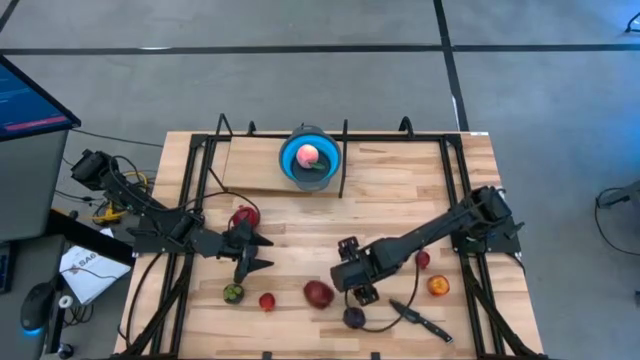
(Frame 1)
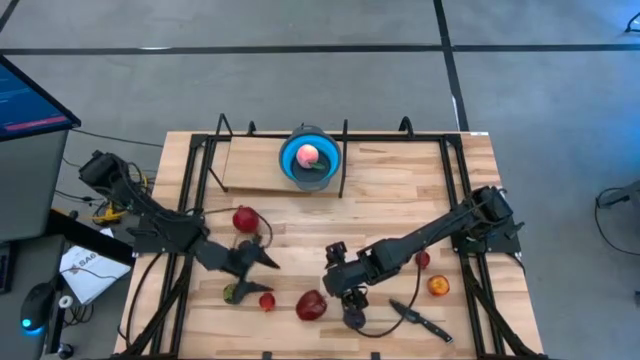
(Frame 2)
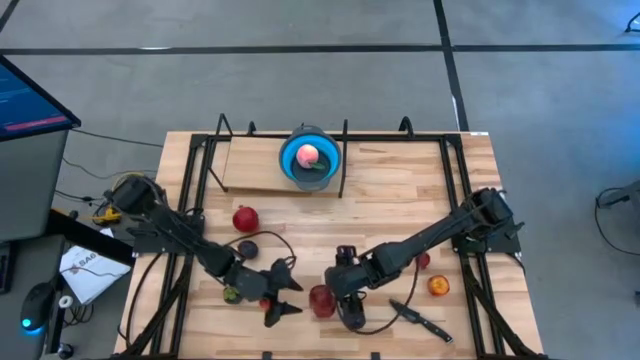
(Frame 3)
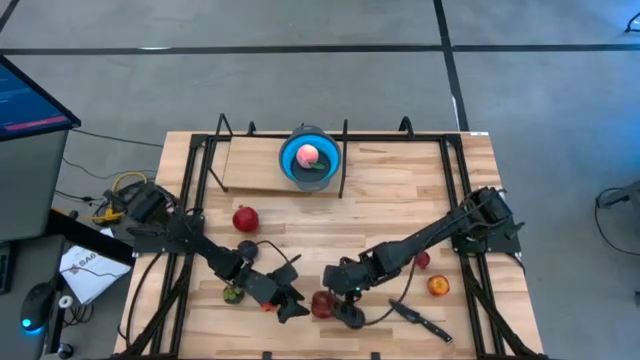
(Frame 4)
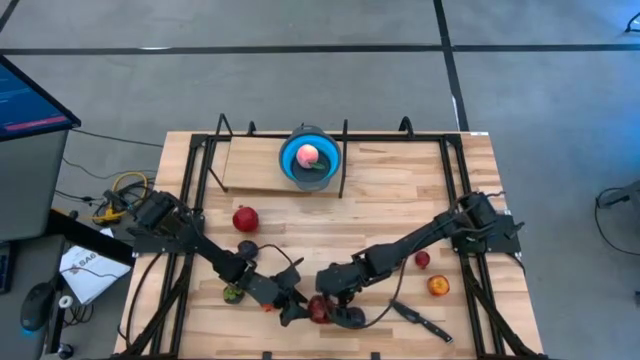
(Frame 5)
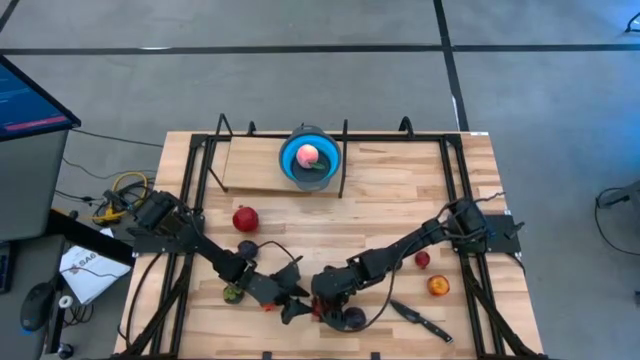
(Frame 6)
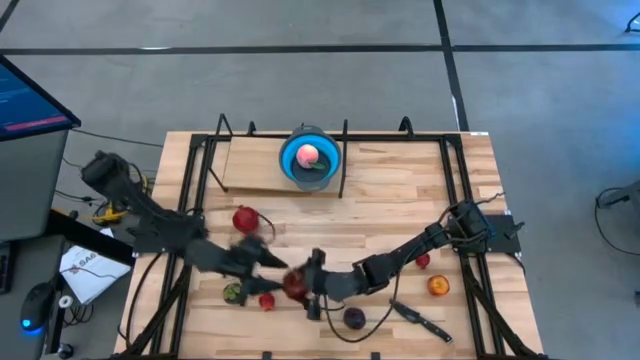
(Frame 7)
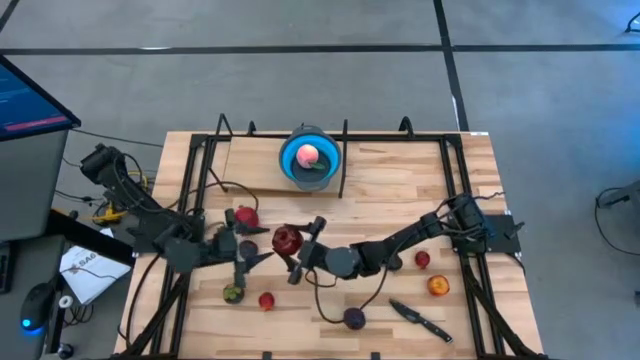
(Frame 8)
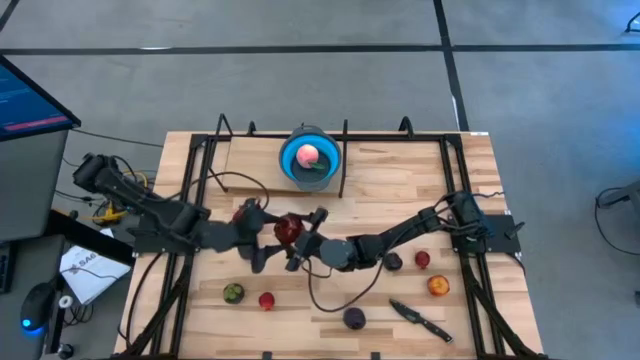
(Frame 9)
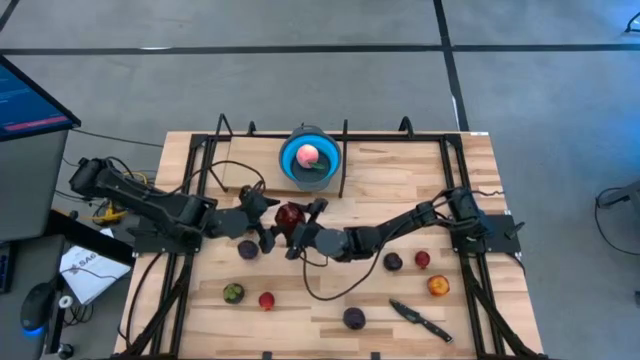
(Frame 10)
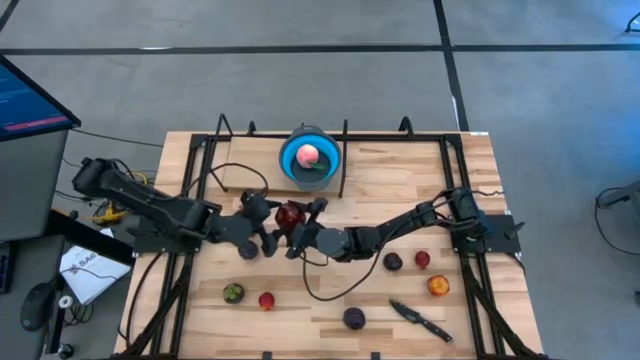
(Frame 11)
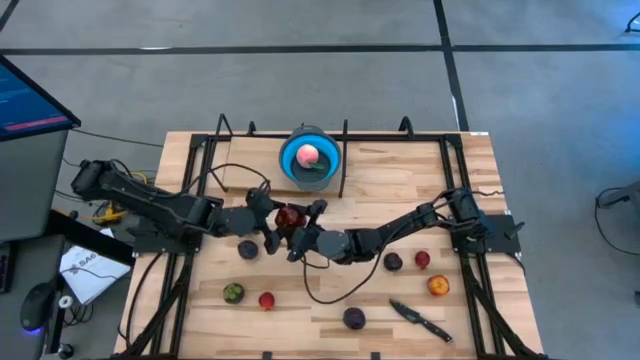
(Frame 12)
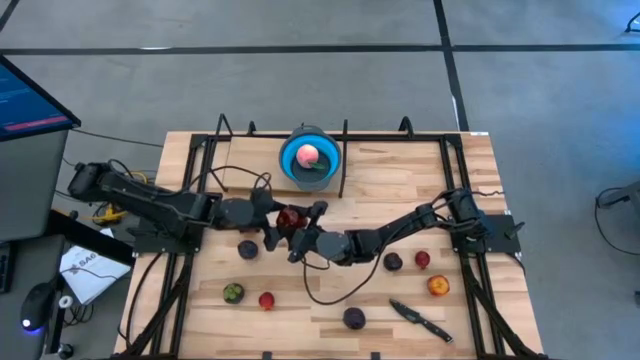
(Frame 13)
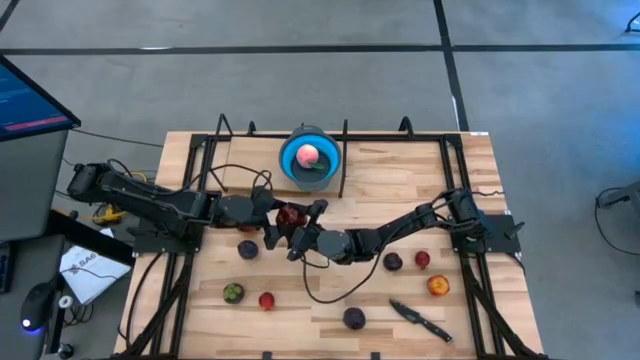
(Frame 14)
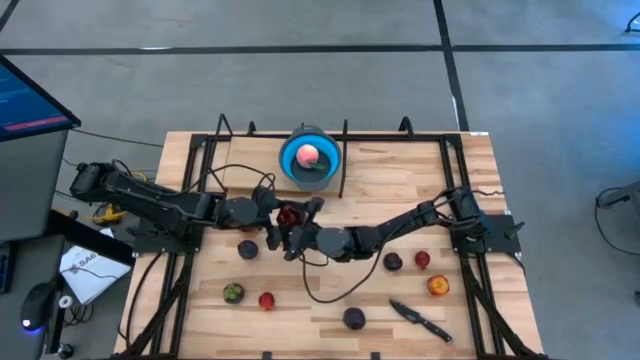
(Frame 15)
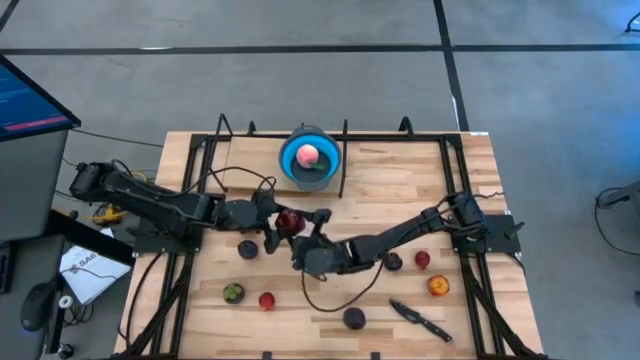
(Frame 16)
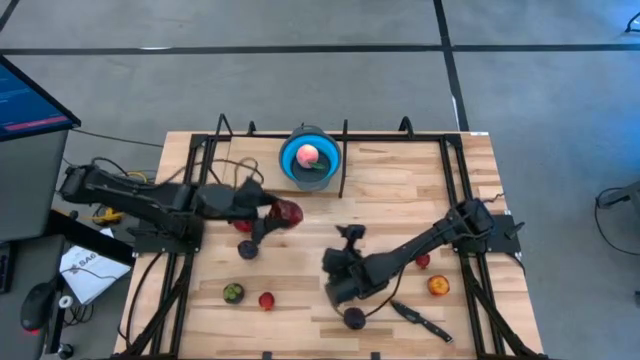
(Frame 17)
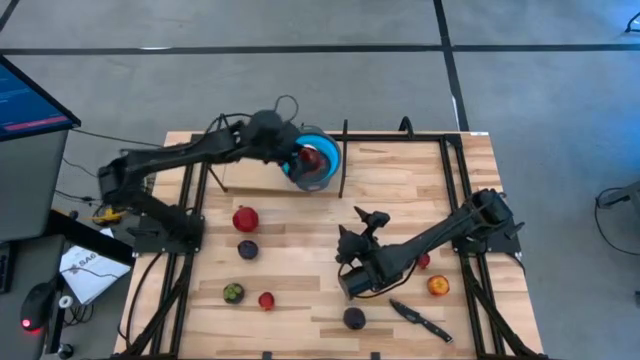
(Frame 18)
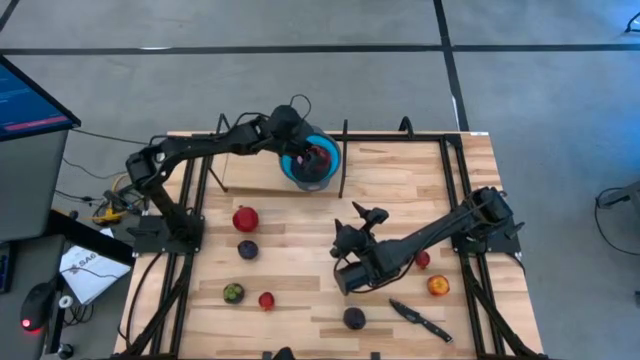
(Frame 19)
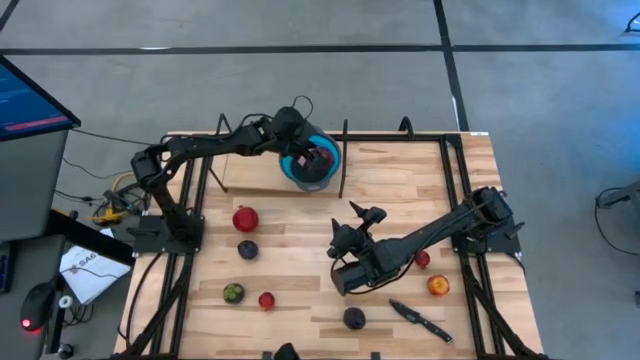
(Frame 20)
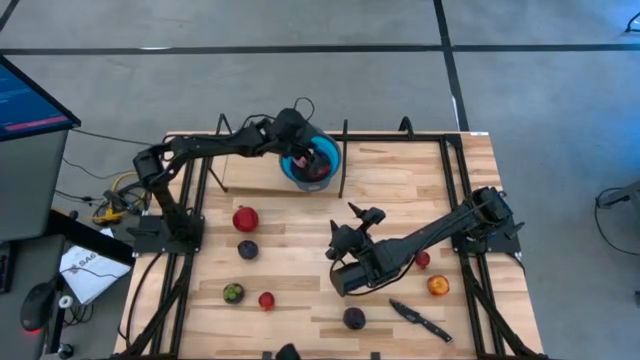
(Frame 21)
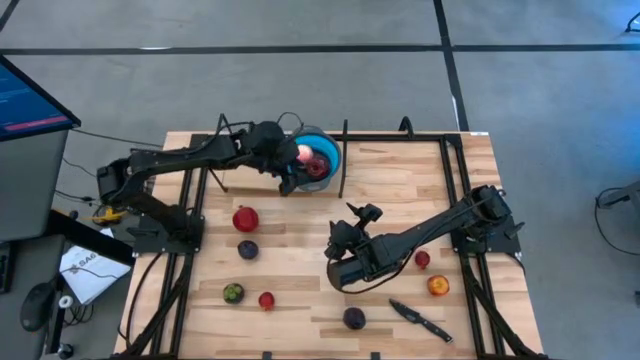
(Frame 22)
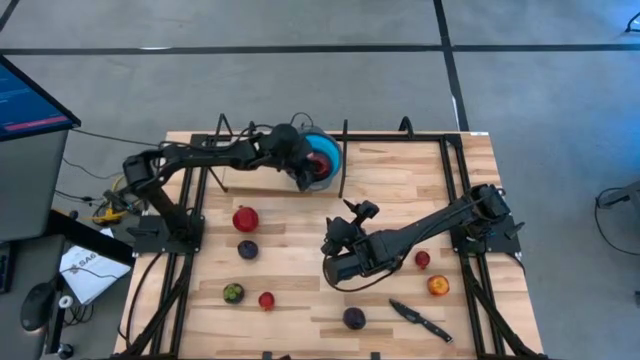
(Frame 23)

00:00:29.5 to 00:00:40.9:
Task: Pick & Place Fruit
Put the red apple into the blue strainer bowl on the shelf

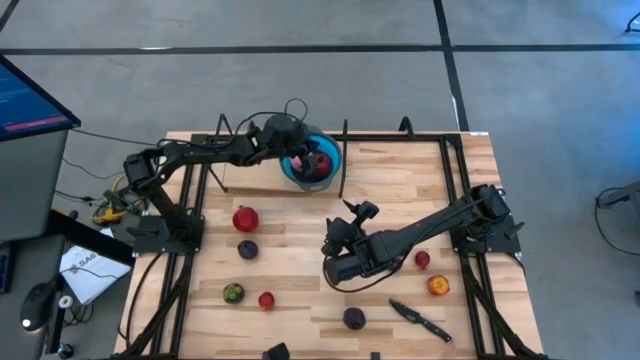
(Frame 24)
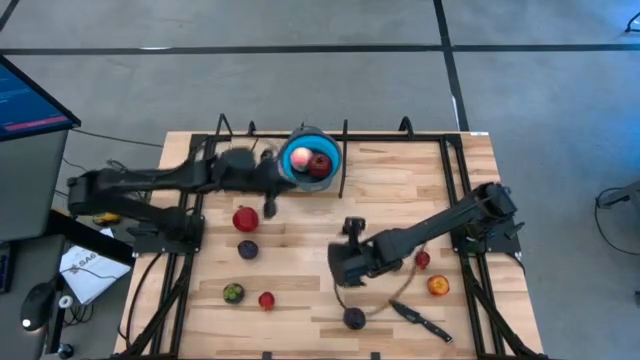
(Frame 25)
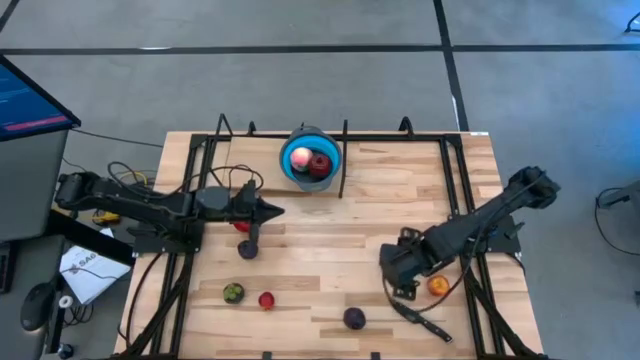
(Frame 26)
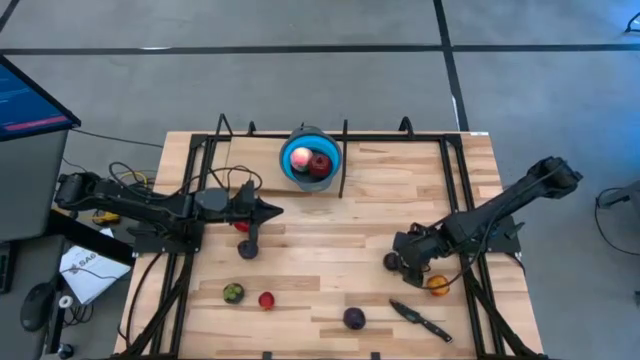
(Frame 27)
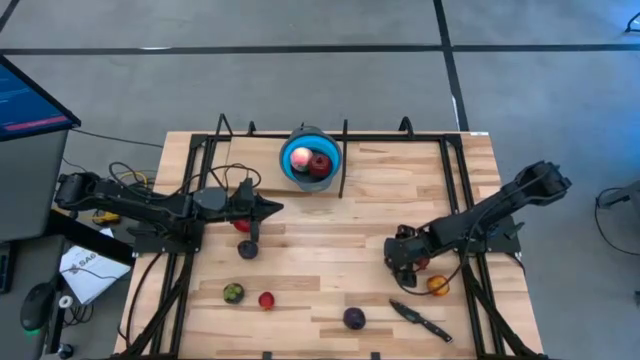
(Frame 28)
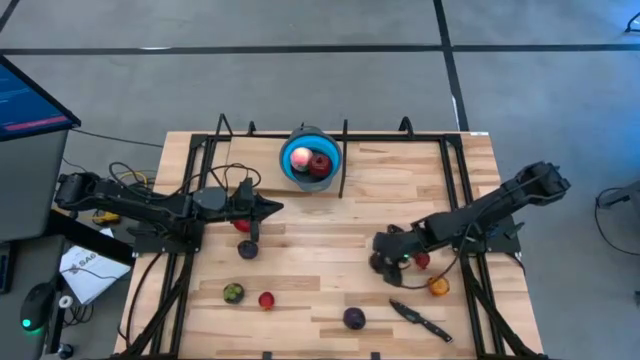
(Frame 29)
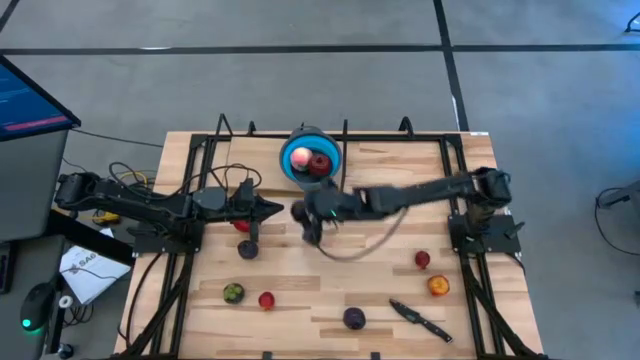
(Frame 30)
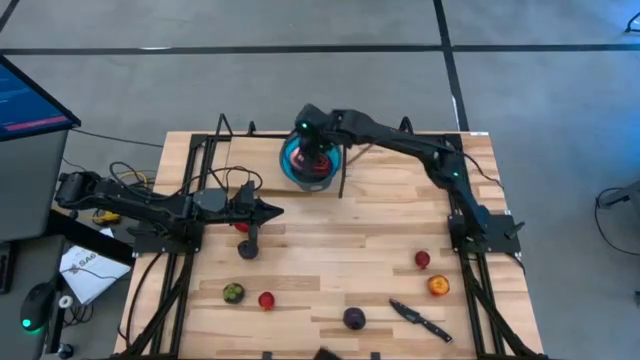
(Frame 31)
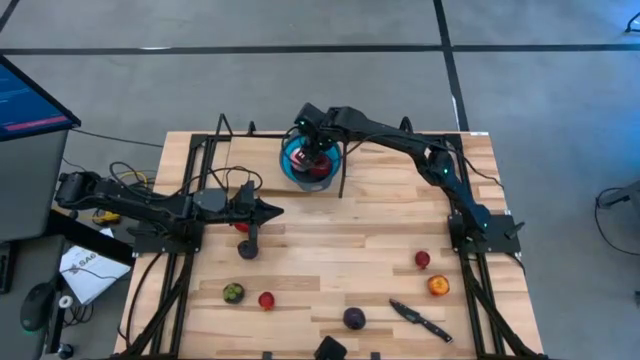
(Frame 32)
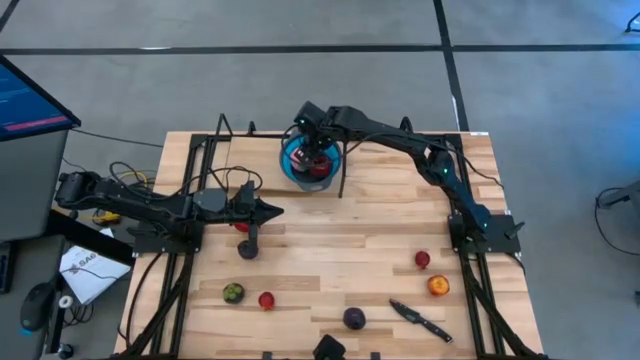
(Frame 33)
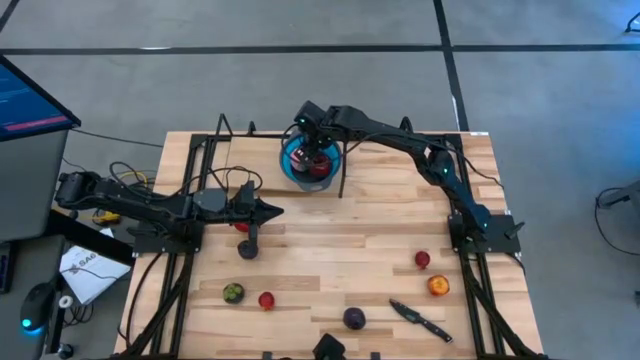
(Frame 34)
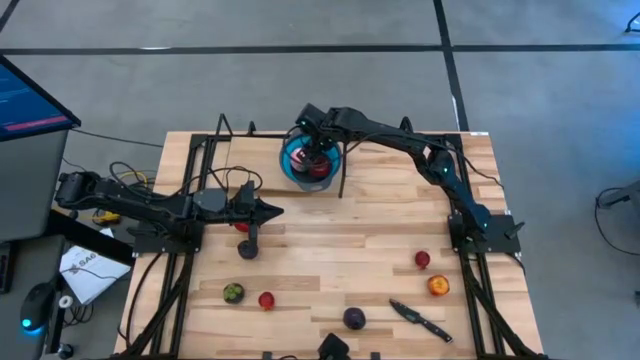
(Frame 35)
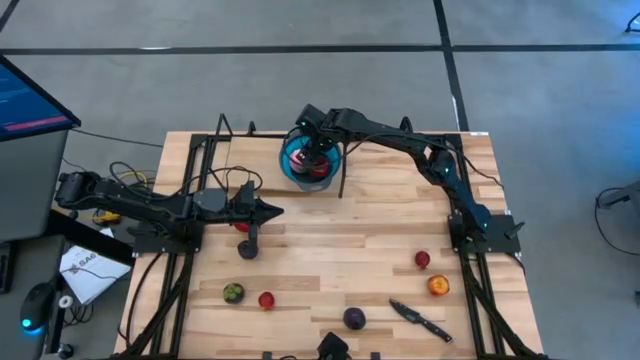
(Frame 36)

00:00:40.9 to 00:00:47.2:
Put the black plum into the blue strainer bowl on the shelf

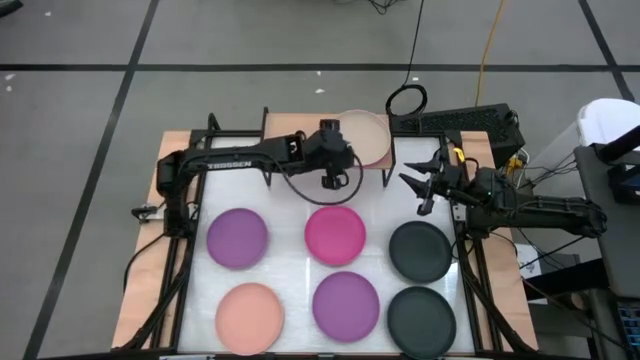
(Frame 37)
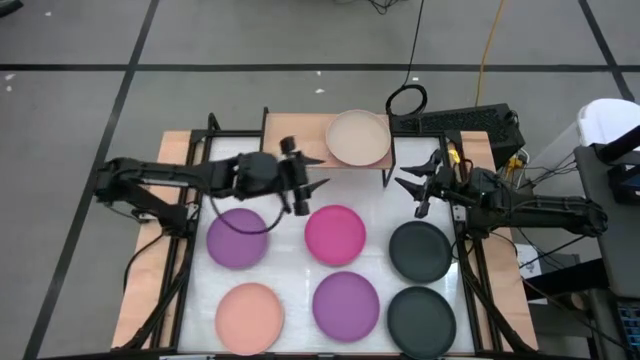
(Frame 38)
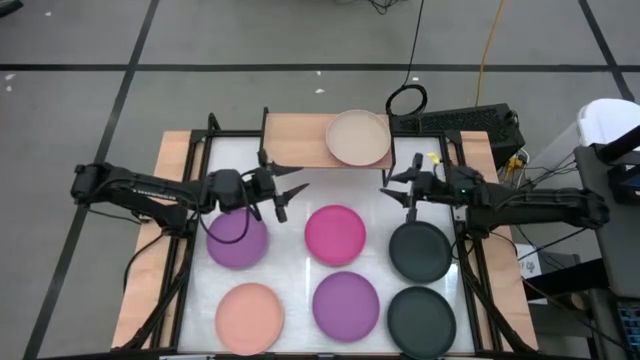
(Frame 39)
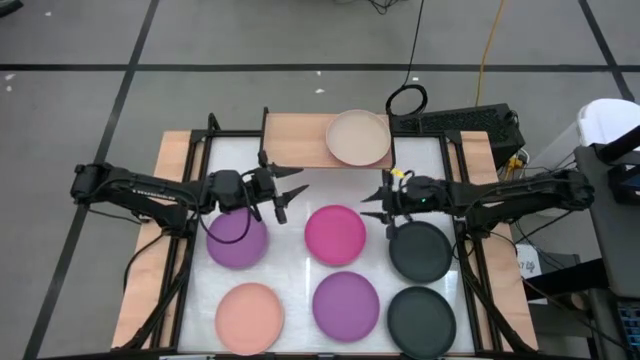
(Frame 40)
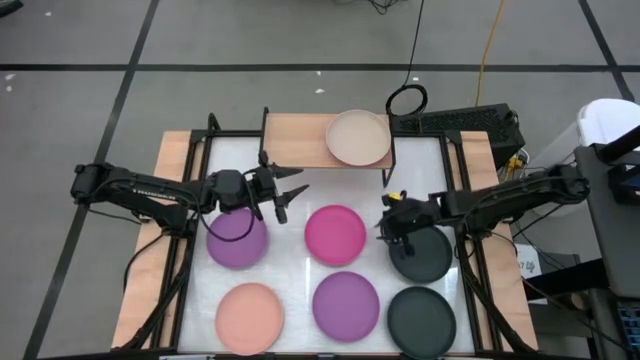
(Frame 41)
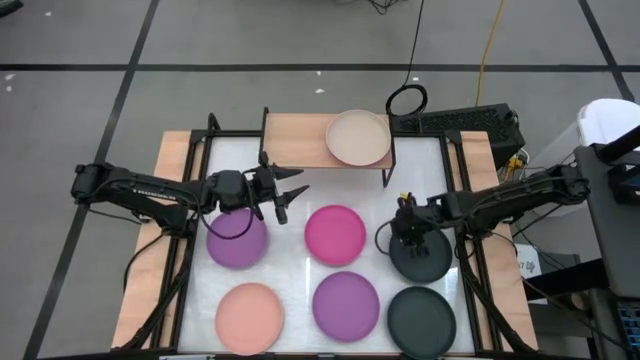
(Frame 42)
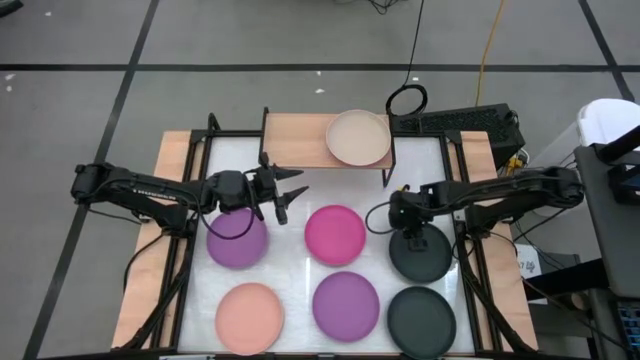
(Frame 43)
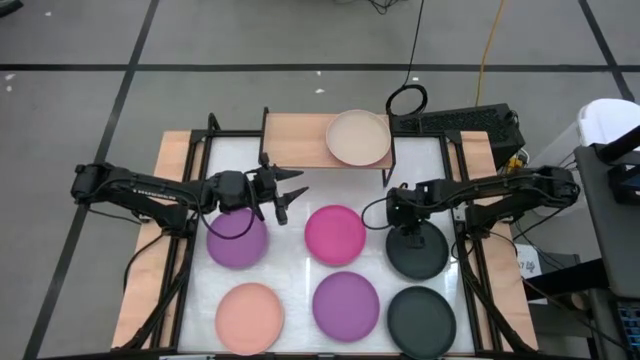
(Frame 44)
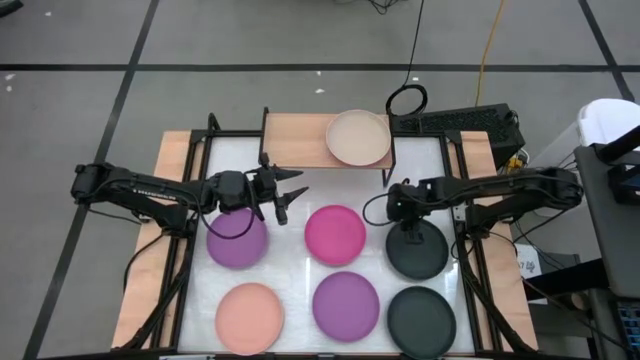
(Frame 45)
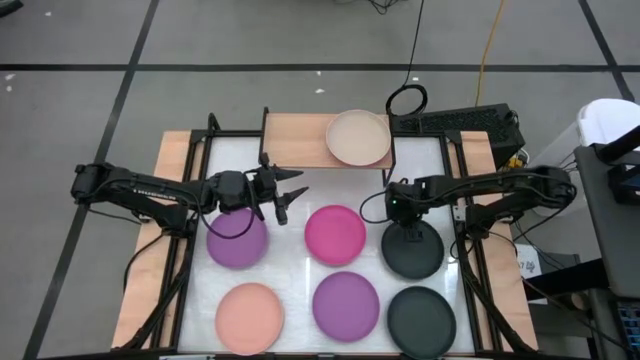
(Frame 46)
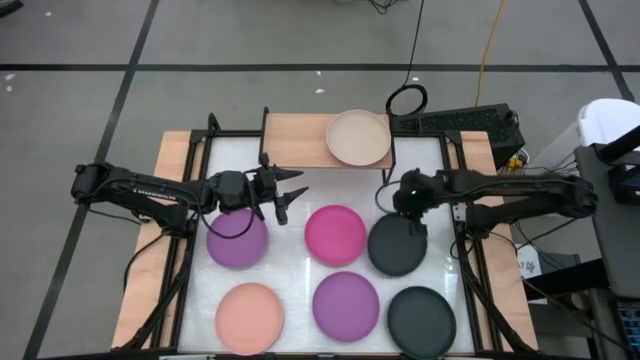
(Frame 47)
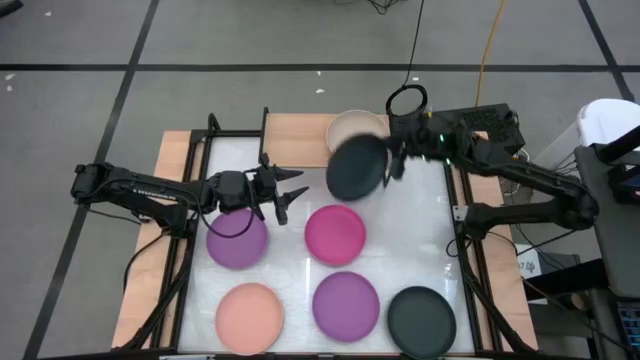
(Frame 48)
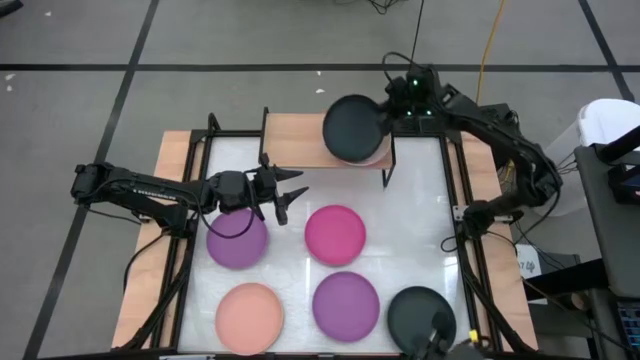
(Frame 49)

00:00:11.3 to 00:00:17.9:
Task: Place and stack plates onto a shelf
Stack the top black plate on top of the white plate on the shelf
